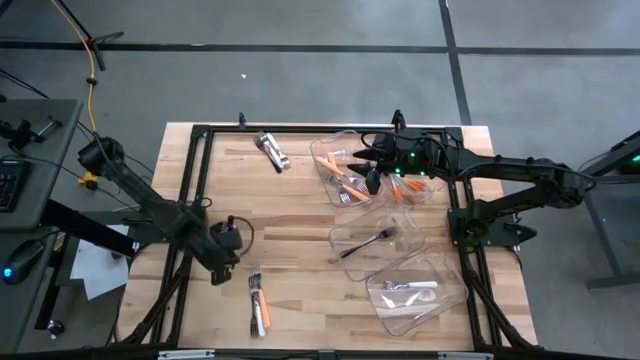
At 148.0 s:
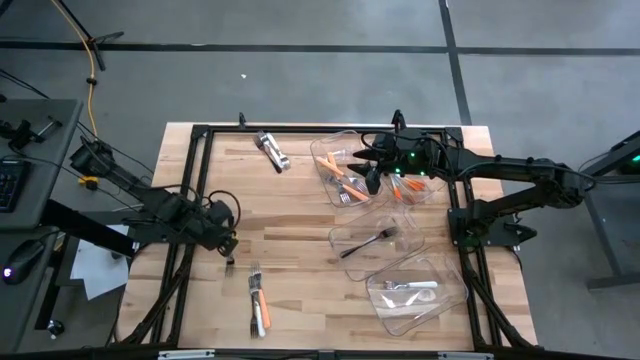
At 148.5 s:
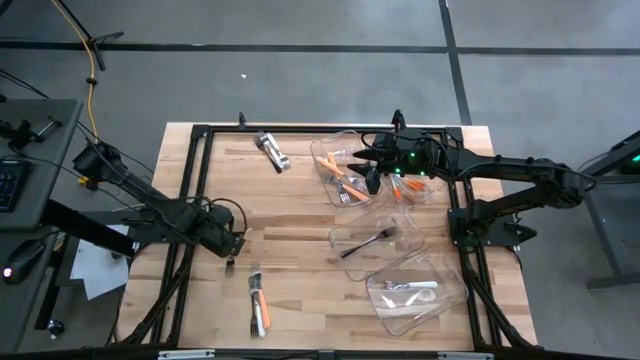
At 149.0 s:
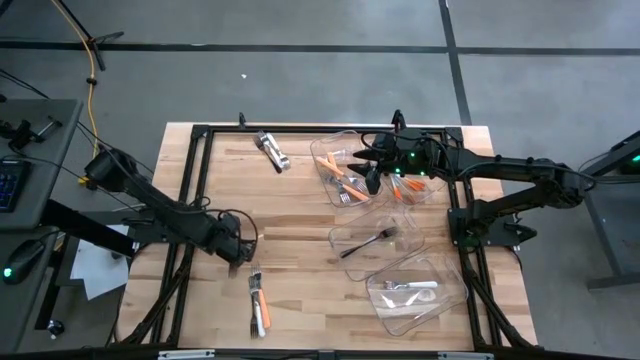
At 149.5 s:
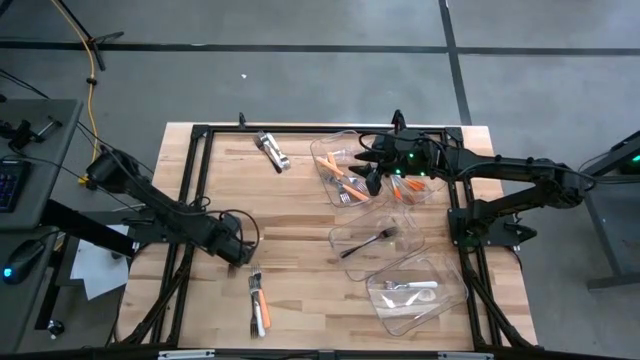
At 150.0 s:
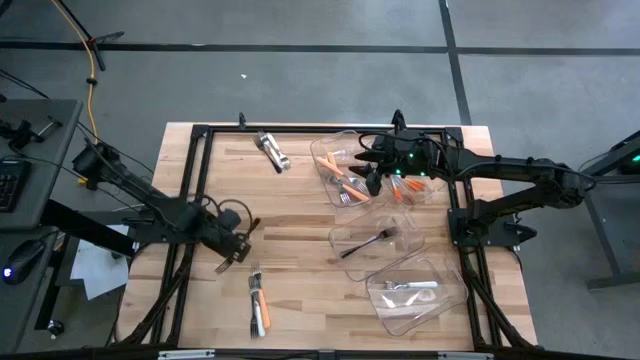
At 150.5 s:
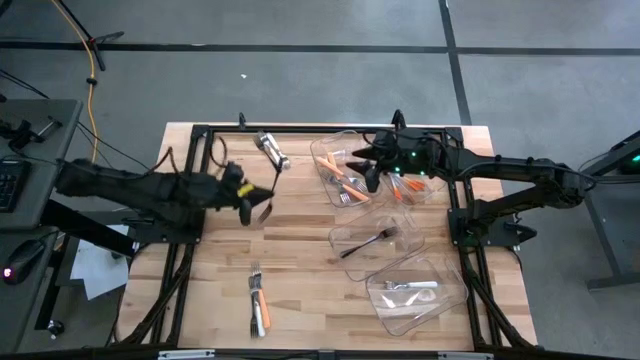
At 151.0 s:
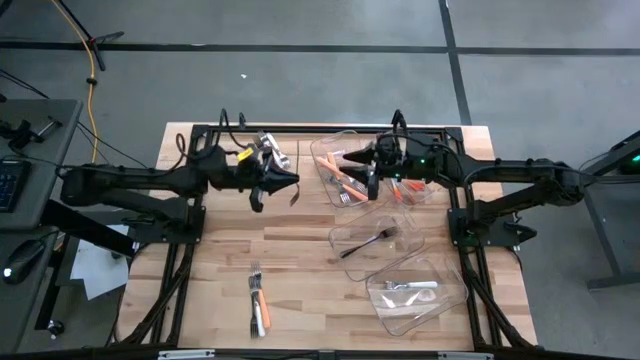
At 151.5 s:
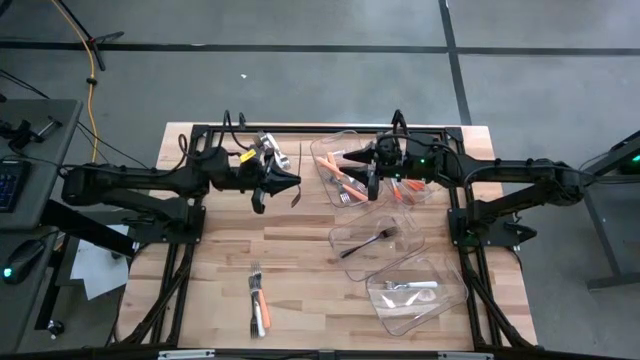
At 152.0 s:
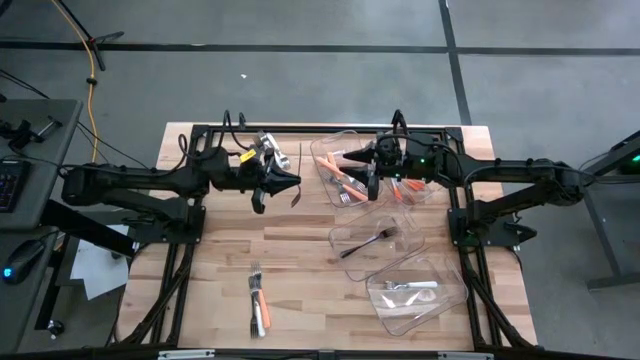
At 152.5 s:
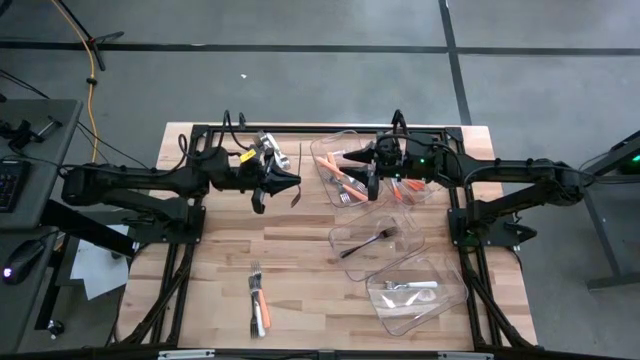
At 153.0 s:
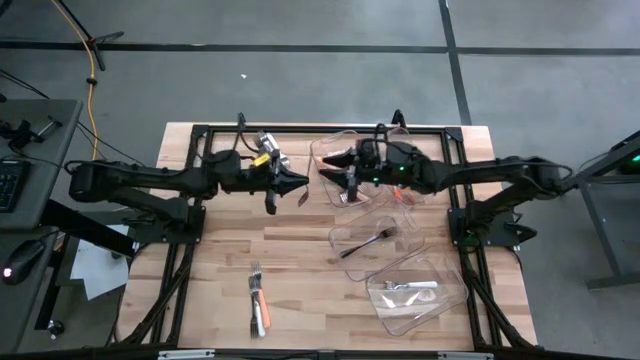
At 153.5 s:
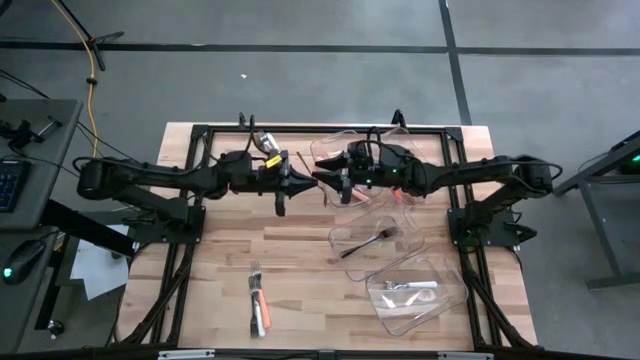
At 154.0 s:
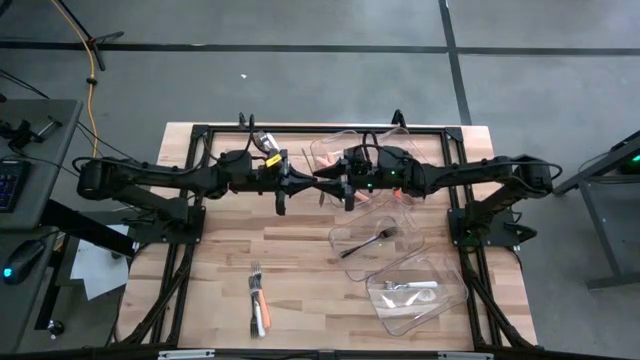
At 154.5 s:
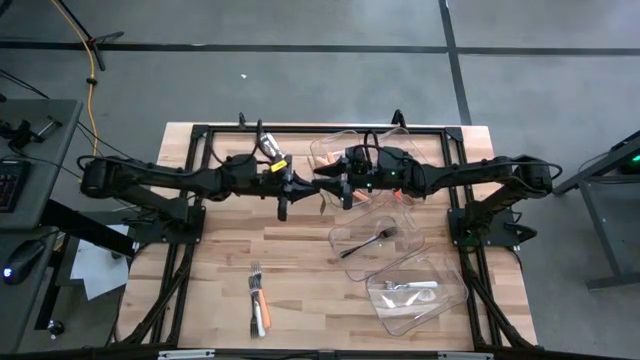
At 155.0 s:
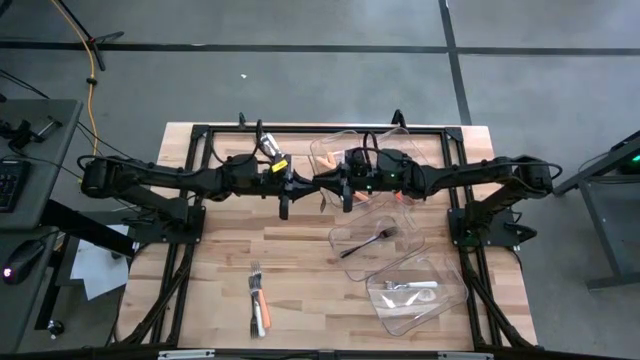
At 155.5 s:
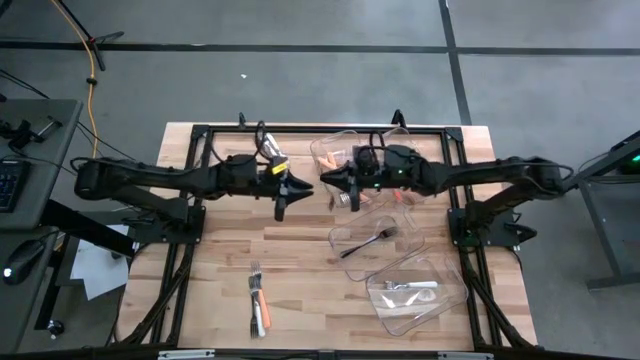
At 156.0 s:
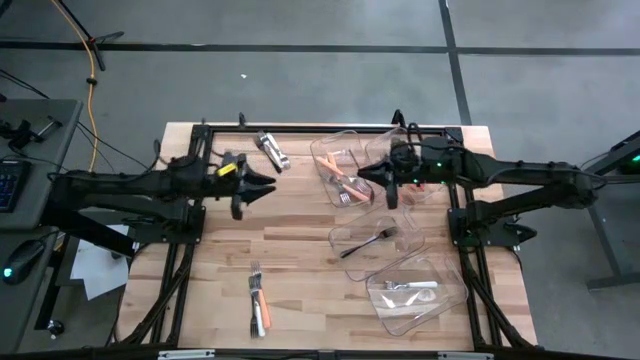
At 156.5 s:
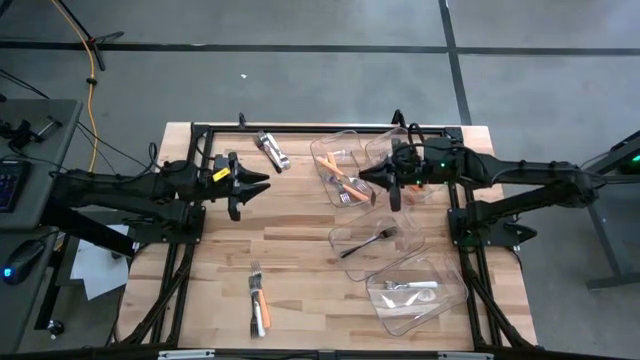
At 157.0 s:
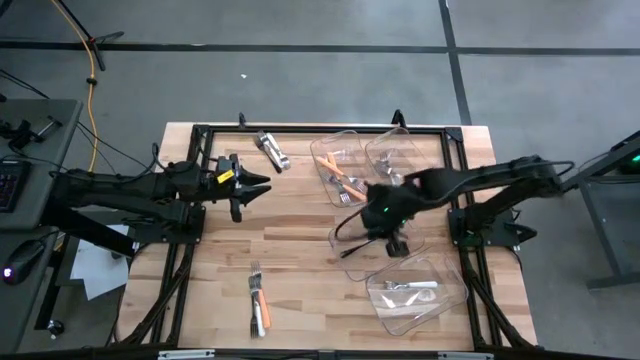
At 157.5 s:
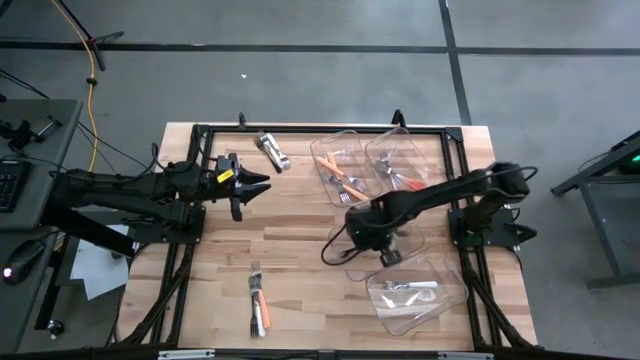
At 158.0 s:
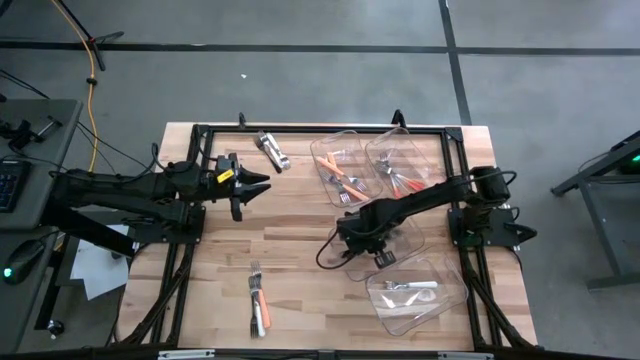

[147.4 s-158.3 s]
Task: Sort silverware by color (type)
Move the white fork from the top

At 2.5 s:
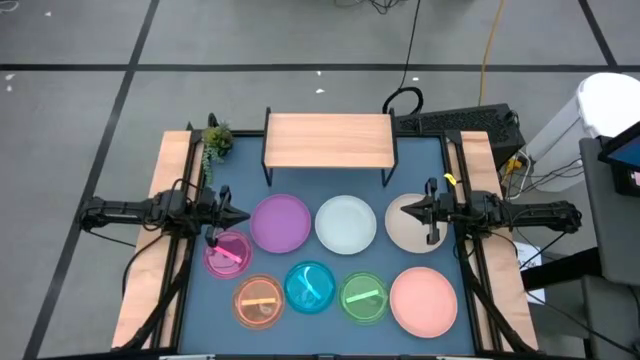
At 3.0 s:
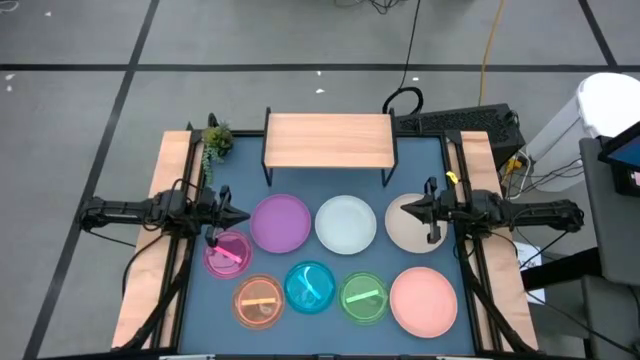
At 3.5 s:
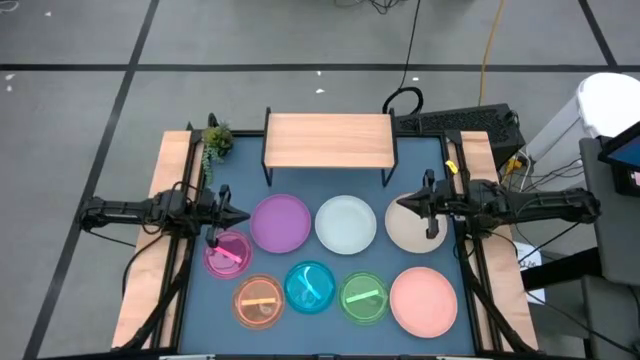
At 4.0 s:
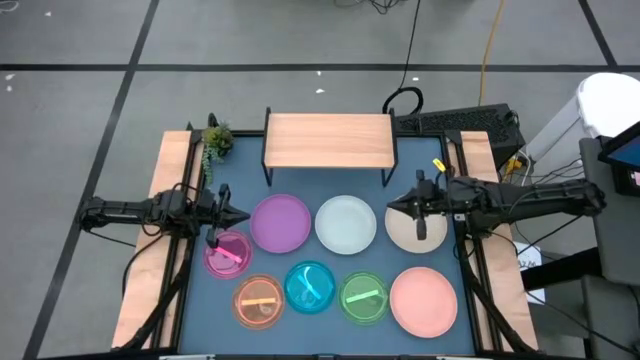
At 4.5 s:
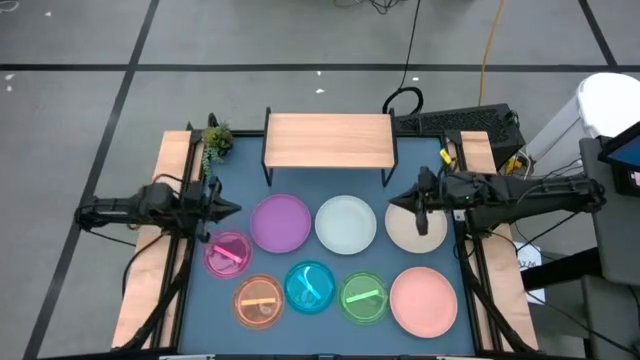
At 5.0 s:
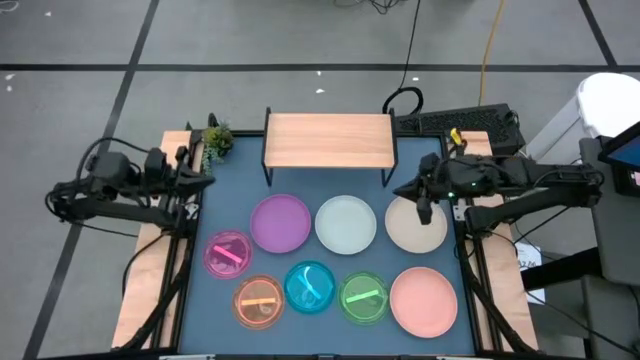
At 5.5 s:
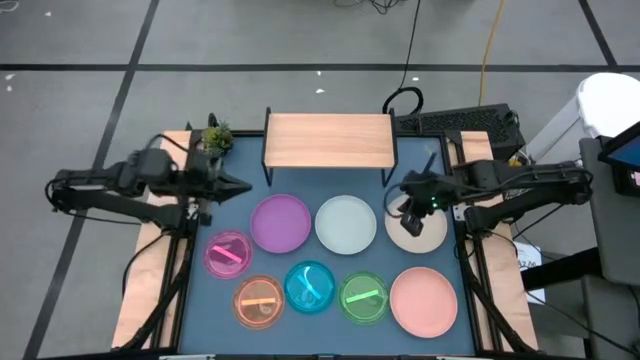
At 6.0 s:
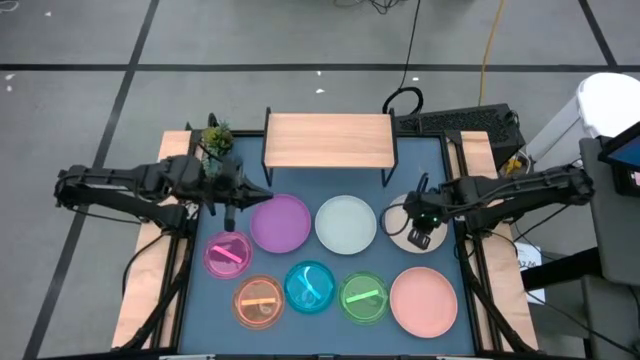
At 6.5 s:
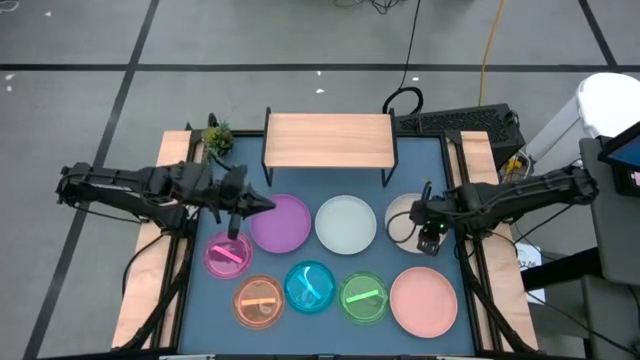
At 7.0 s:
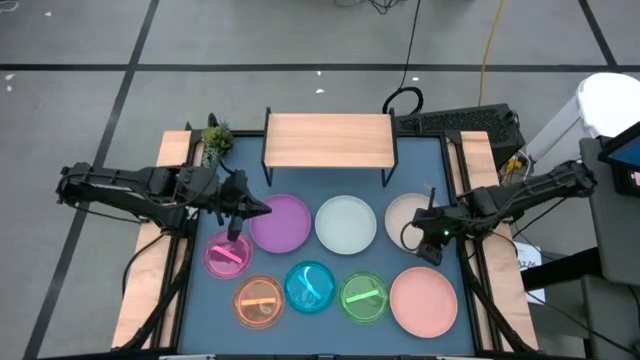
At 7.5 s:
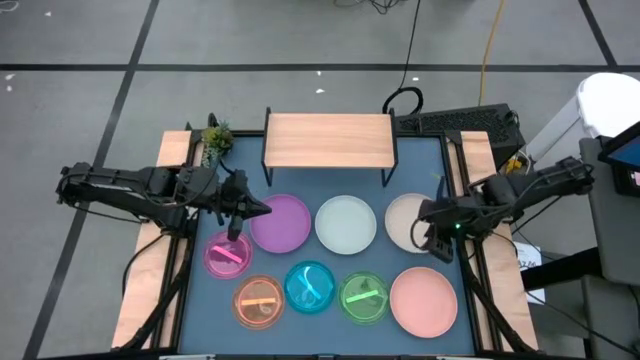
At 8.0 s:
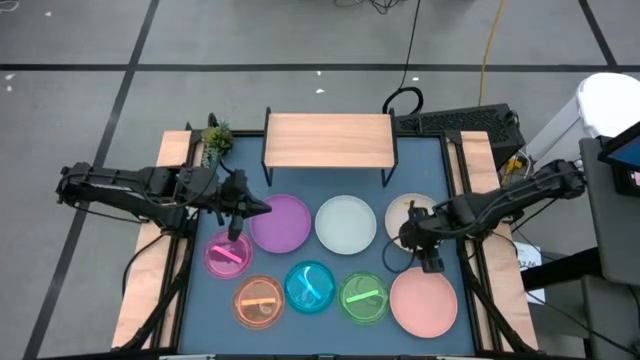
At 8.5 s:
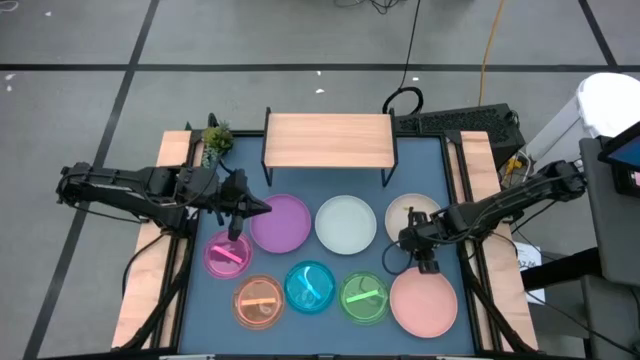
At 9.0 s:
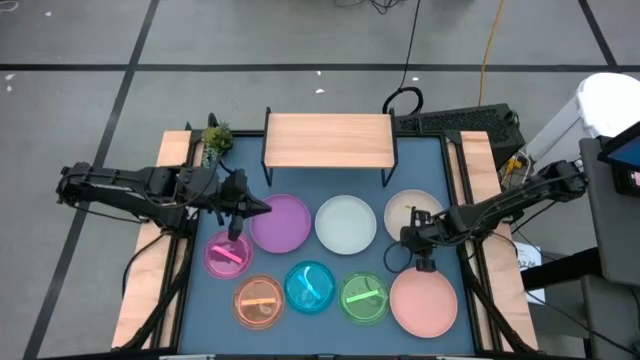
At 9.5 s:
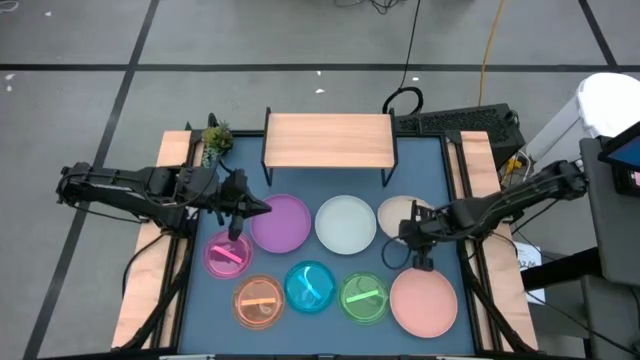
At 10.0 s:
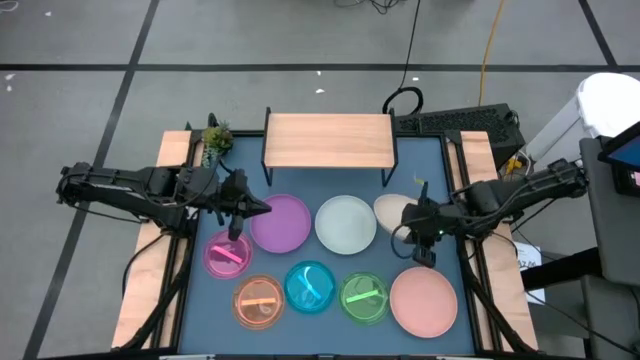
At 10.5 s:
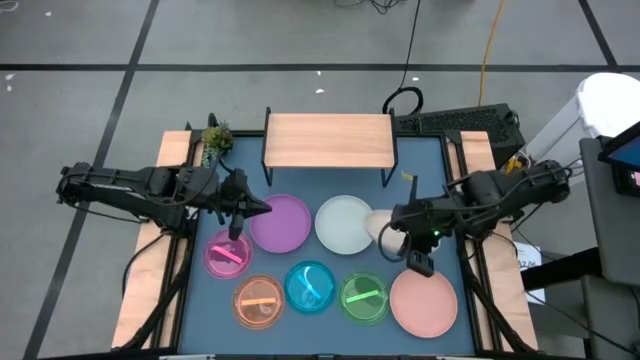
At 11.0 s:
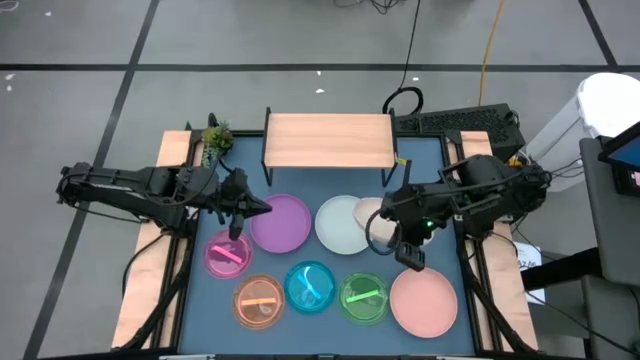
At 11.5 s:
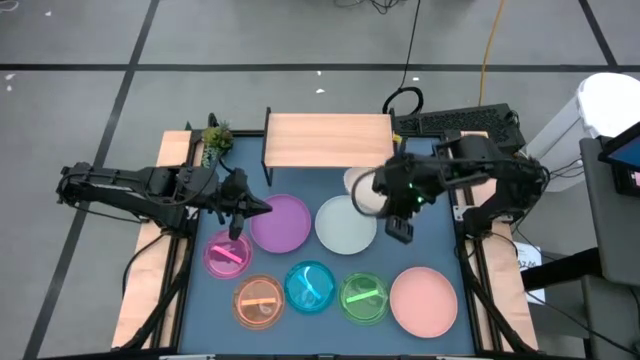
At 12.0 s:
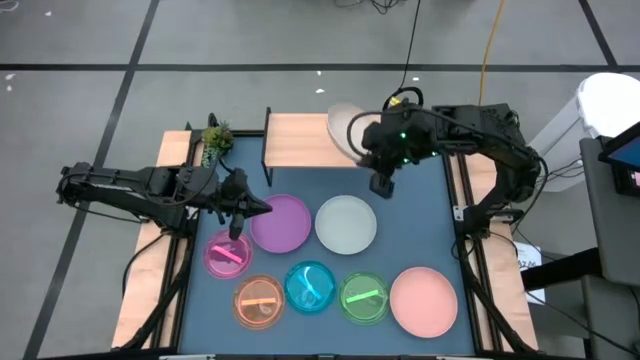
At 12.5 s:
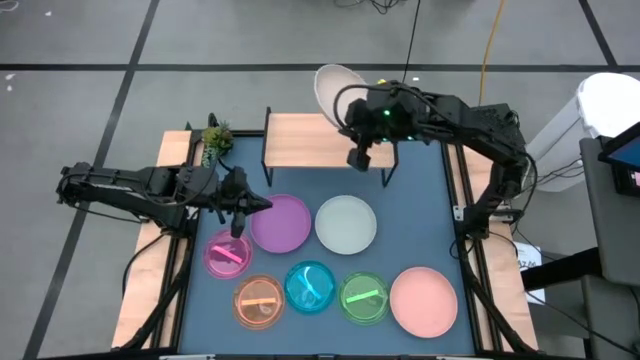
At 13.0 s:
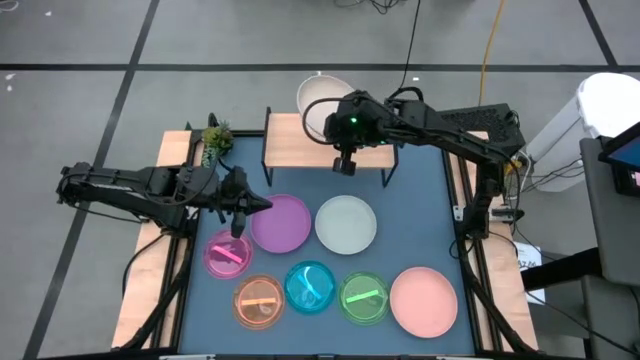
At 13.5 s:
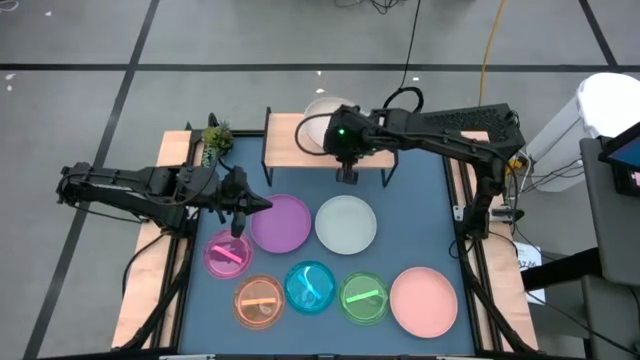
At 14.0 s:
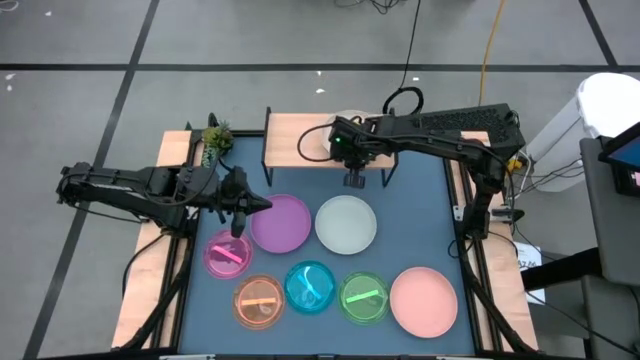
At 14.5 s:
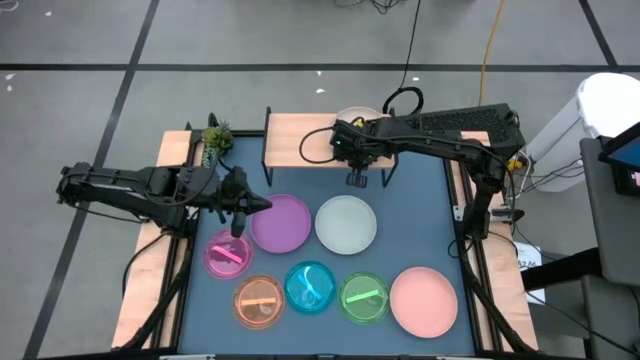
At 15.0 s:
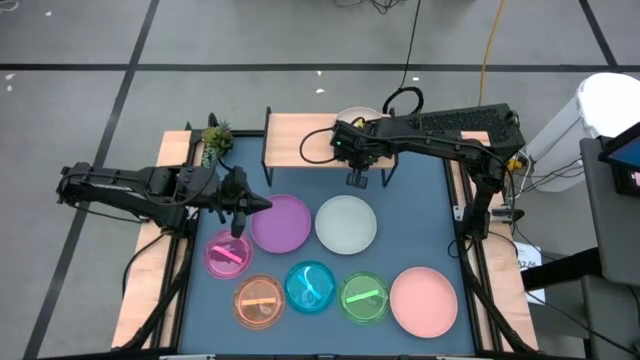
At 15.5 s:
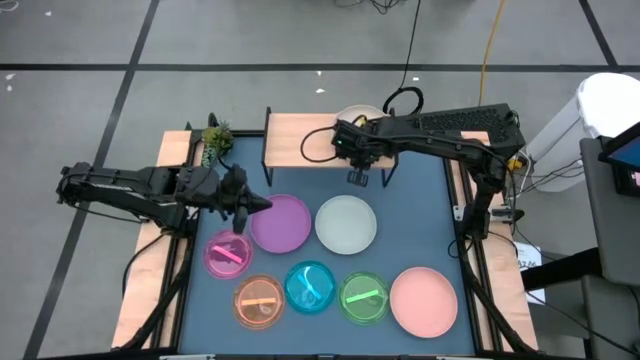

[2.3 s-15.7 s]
Task: Place and stack plates onto a shelf
Put the white plate on the shelf
